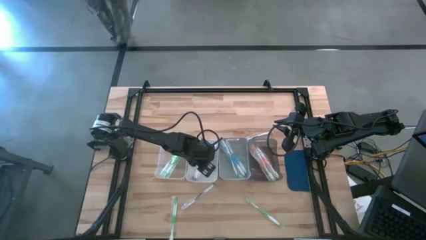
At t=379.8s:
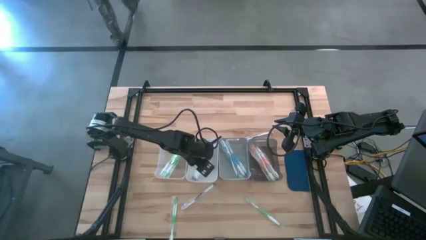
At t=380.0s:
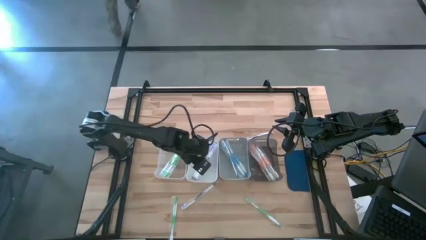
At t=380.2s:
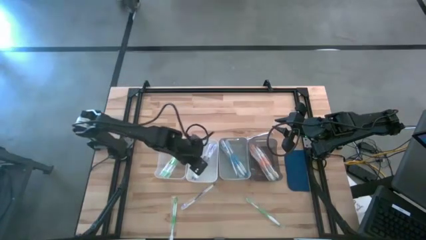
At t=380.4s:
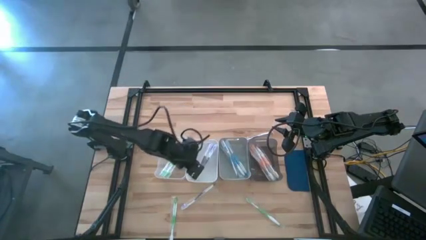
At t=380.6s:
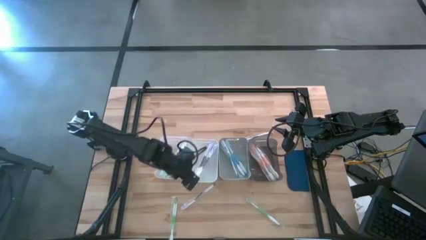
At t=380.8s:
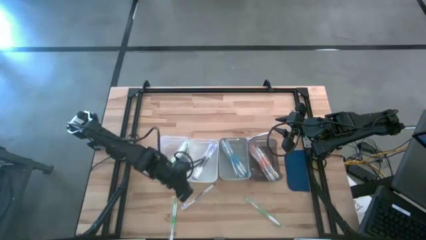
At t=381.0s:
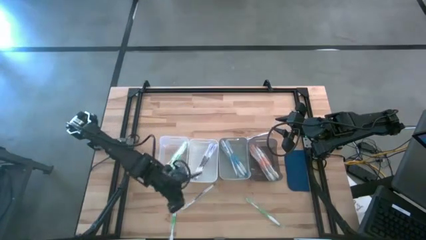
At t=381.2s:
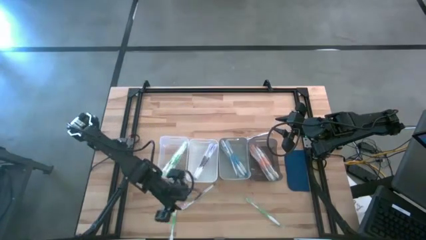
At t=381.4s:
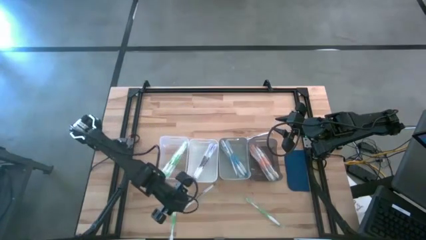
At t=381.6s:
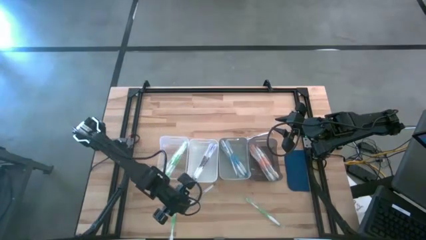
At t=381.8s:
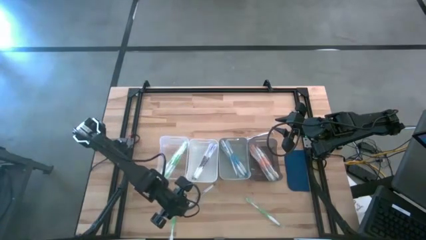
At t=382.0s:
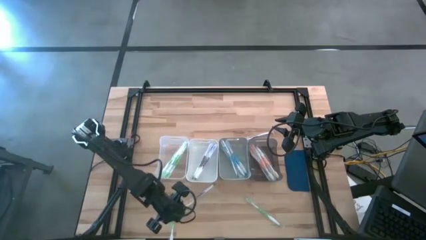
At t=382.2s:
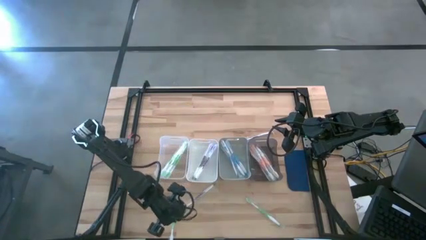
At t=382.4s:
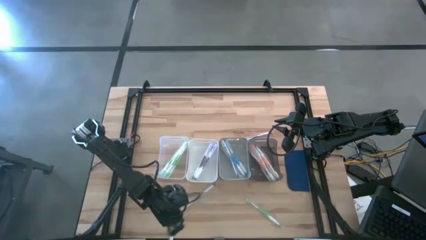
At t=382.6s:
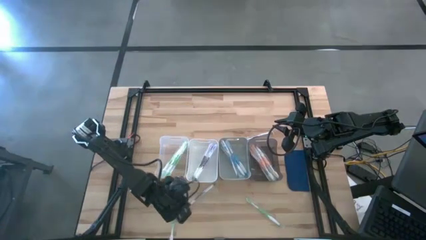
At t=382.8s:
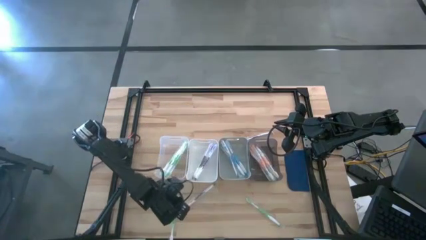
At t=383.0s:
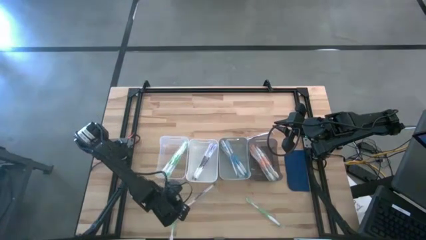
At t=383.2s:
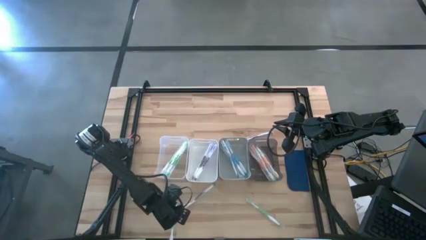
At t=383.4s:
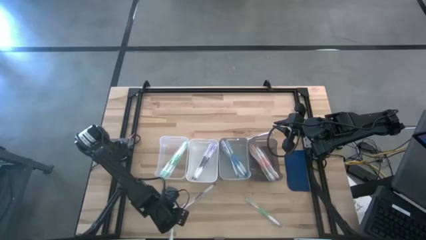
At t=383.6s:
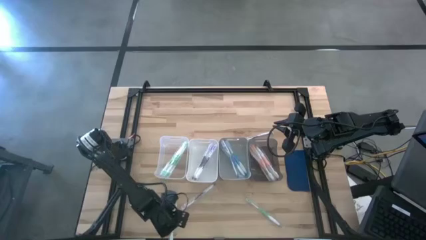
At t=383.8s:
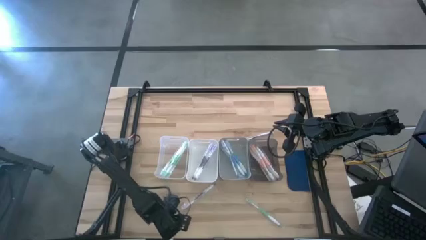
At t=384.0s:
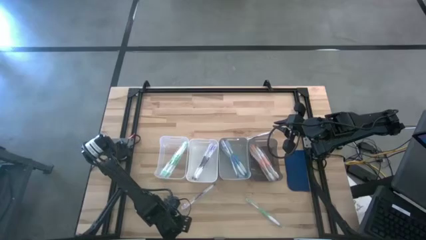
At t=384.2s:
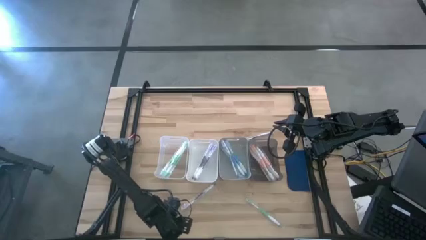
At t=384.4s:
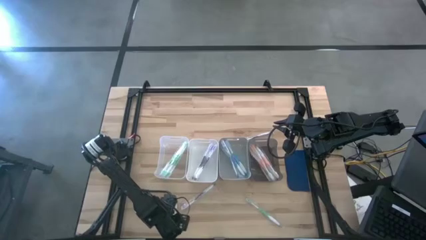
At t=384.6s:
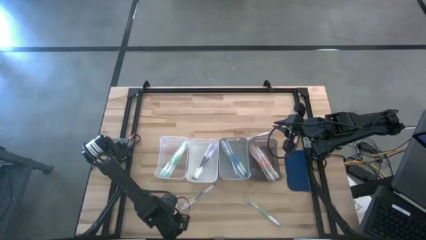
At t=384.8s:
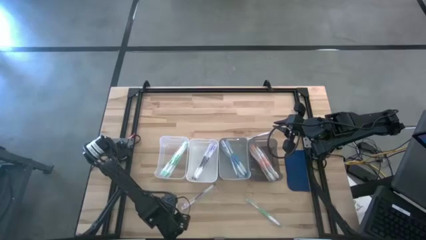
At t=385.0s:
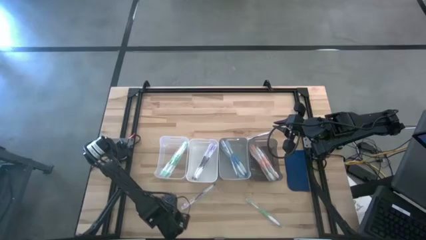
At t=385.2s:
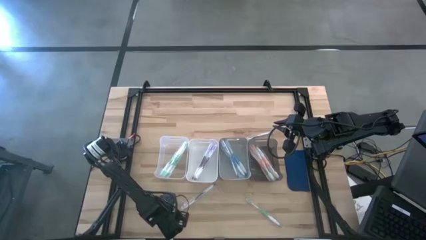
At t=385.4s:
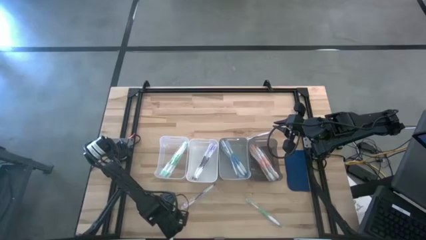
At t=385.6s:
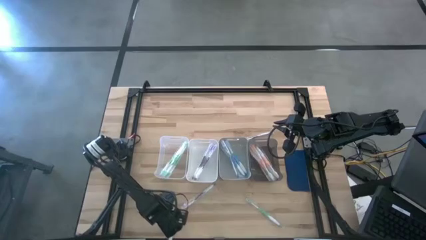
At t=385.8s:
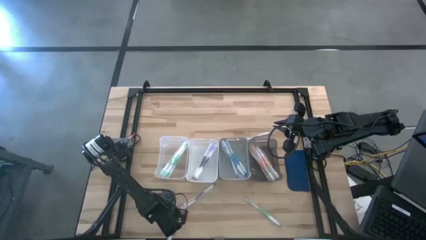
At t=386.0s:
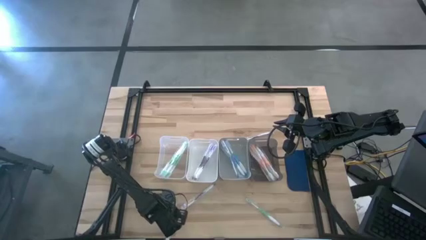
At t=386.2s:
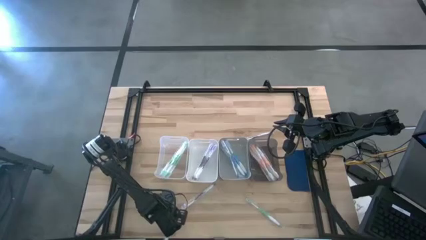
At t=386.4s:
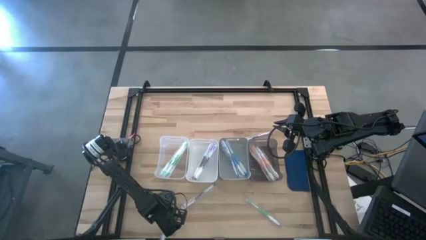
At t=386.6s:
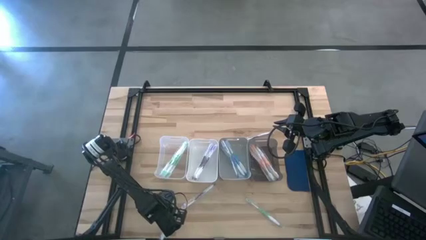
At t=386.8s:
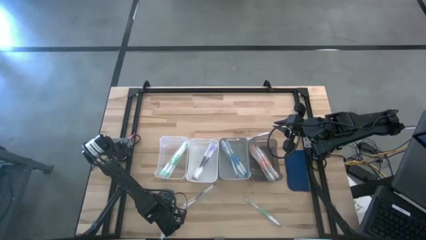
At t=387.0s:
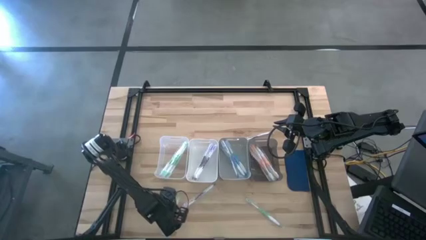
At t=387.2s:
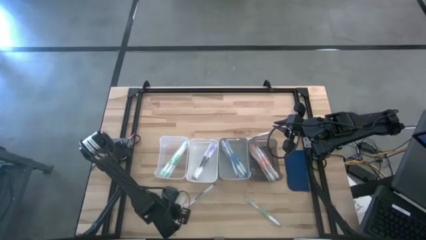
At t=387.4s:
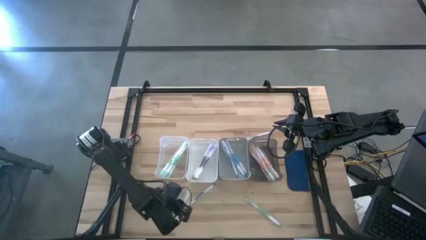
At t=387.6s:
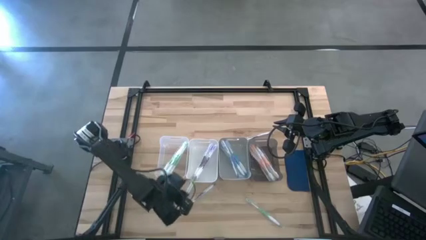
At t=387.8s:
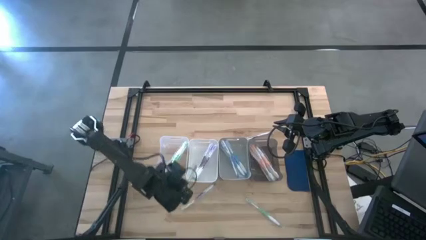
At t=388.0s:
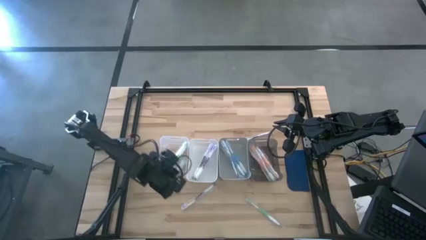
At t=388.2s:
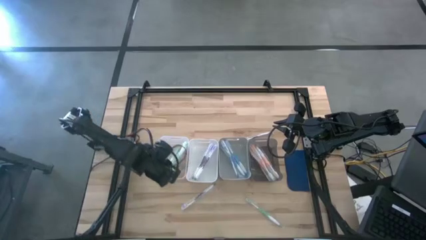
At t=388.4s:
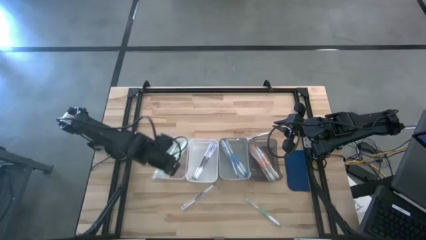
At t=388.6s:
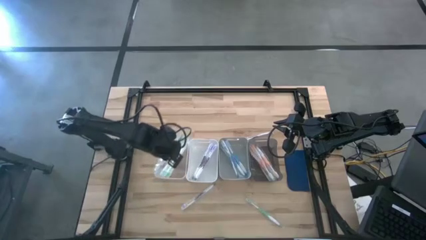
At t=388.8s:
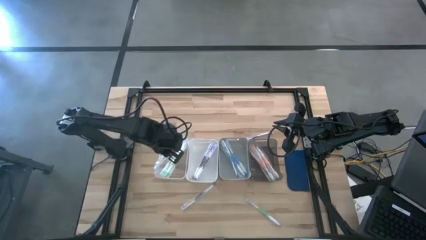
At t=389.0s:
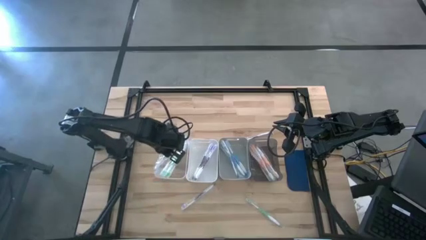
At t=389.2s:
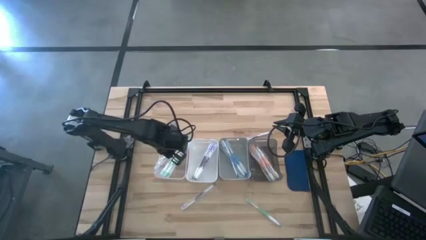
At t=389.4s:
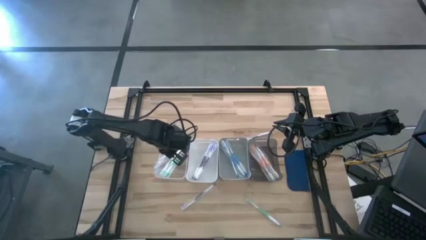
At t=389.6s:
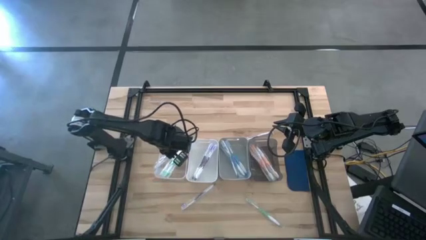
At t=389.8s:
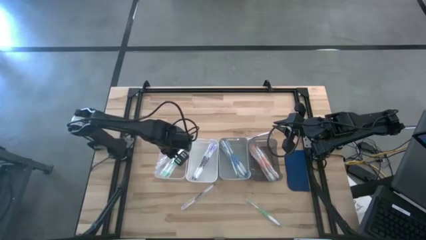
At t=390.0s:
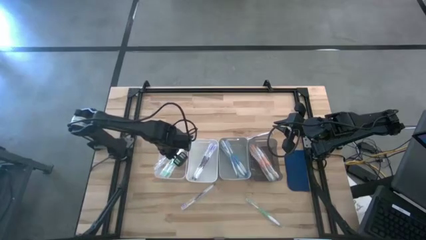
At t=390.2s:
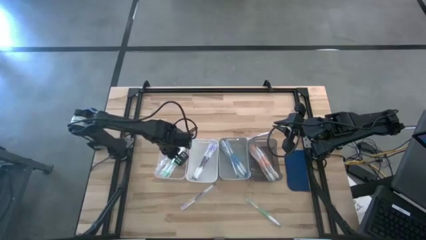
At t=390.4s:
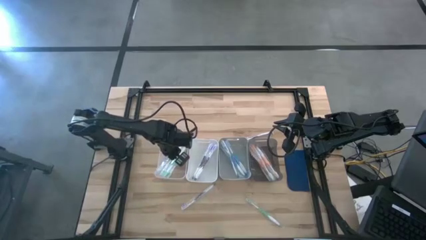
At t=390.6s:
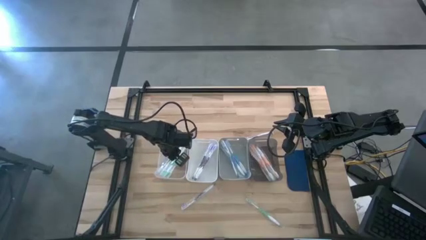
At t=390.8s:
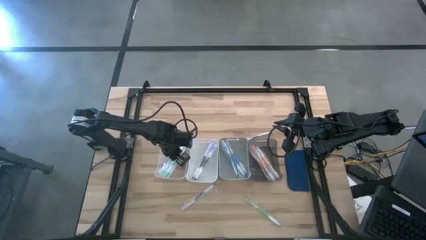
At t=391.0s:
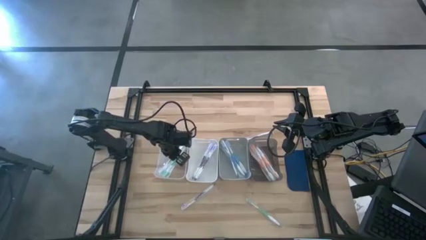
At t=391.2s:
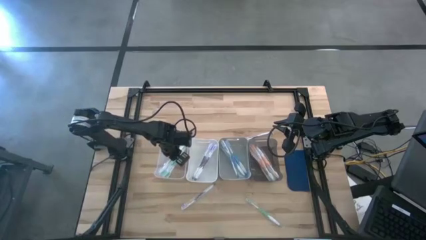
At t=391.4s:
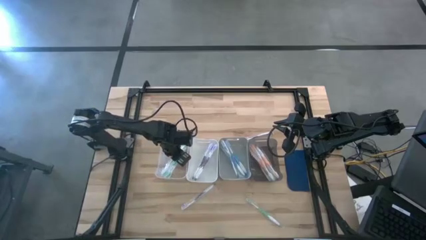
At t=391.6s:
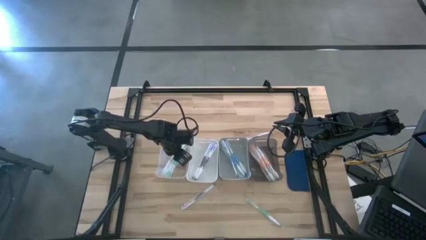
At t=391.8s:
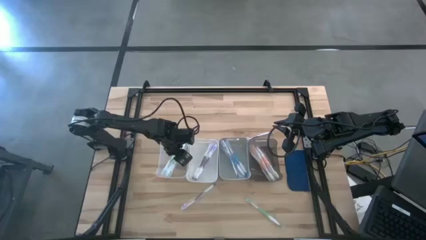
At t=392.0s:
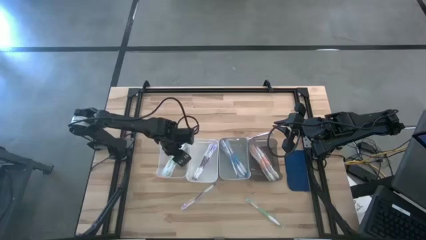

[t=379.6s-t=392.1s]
Task: Pick & Place Toothbrushes
Put the green toothbrush into the transparent bin
